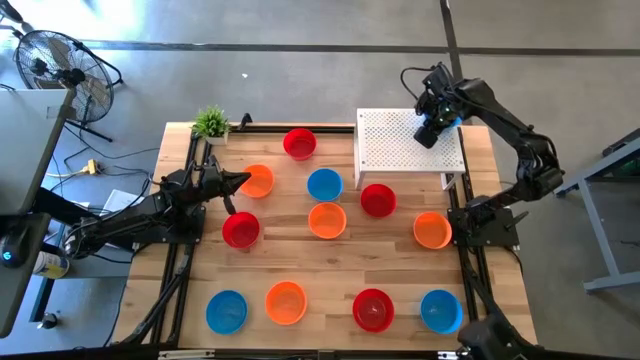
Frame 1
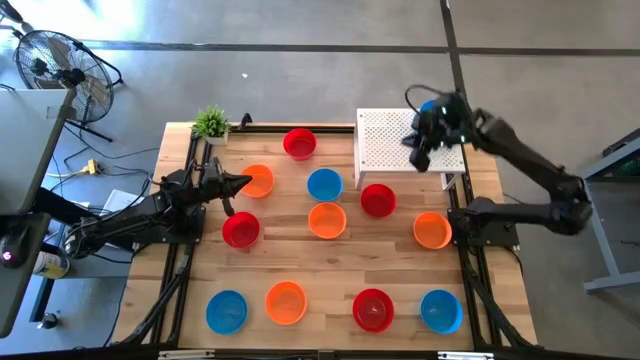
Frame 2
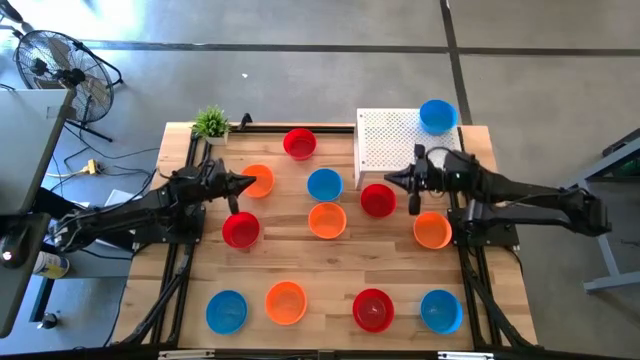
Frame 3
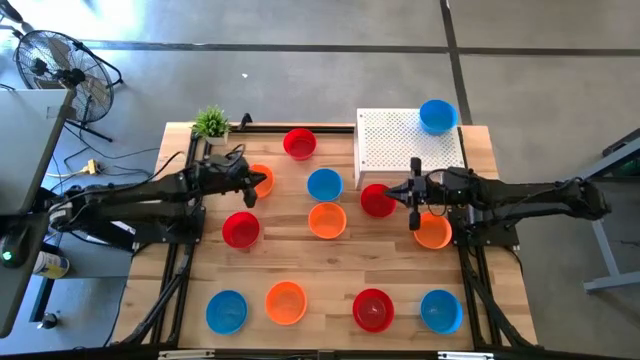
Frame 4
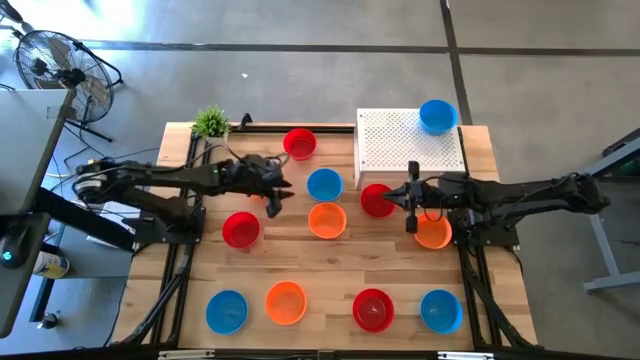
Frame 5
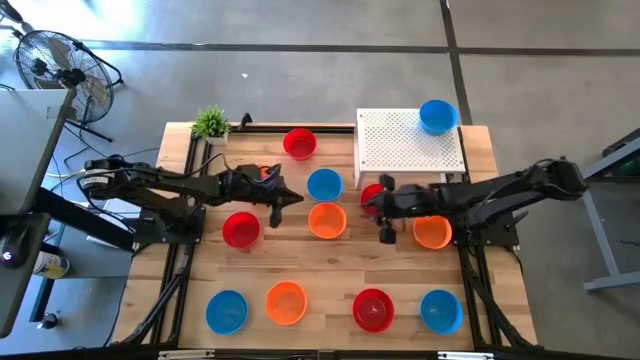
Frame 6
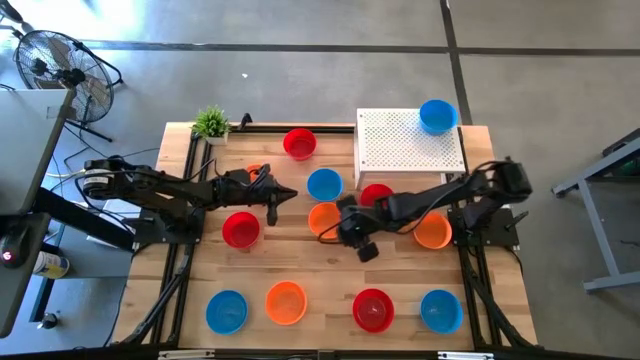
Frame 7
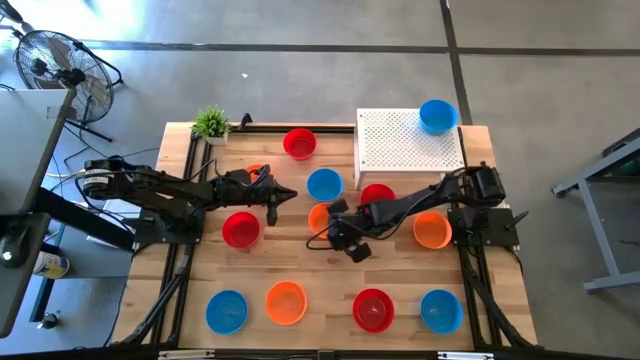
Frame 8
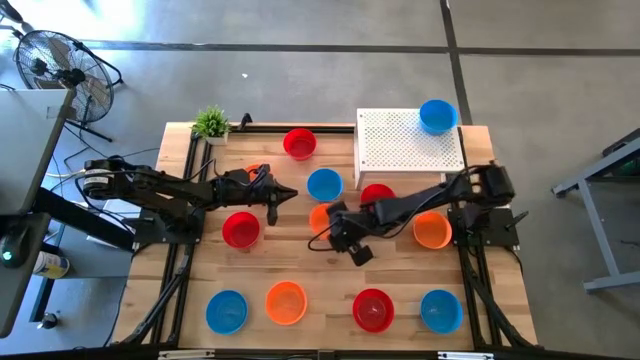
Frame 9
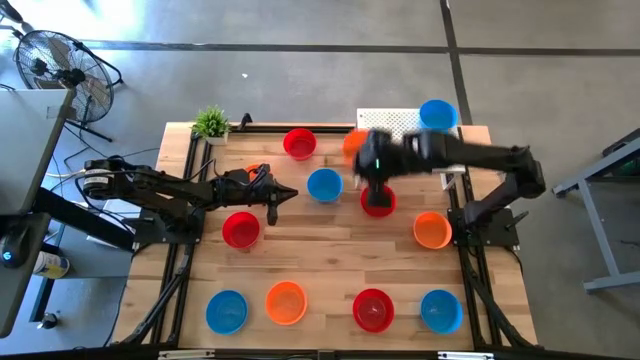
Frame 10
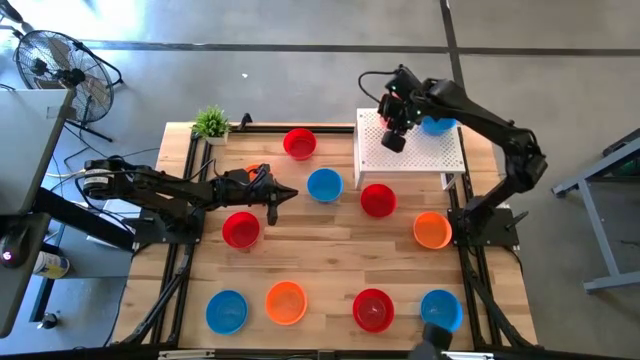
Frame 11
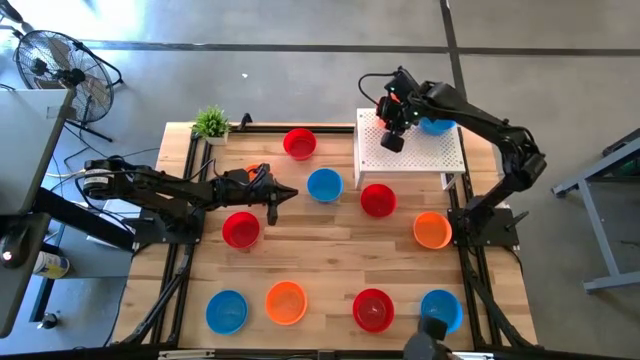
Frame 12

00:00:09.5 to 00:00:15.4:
Task: Pick & Place Mini bowls
Put the orange bowl on the shelf

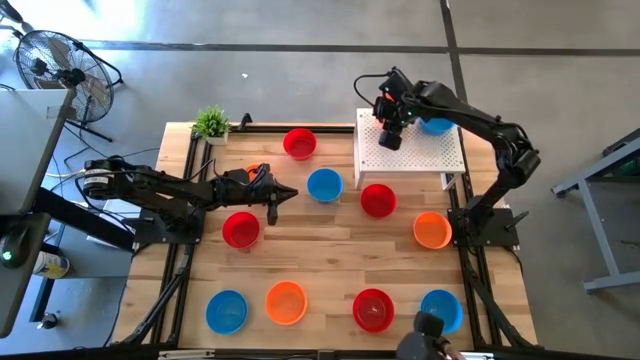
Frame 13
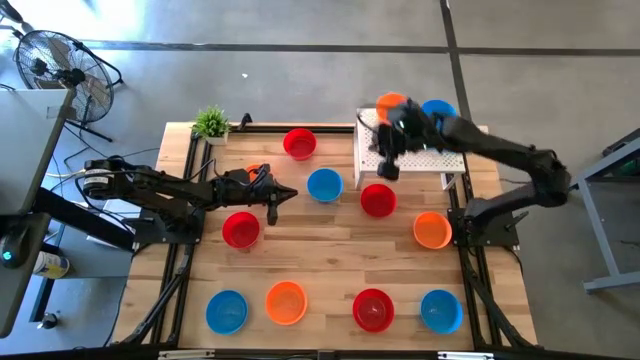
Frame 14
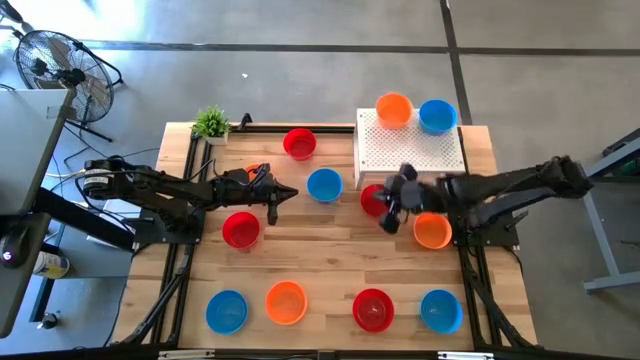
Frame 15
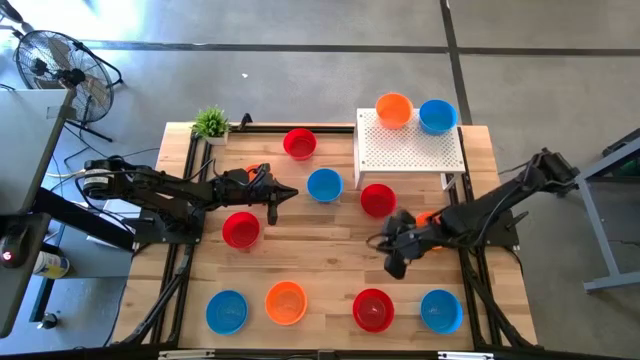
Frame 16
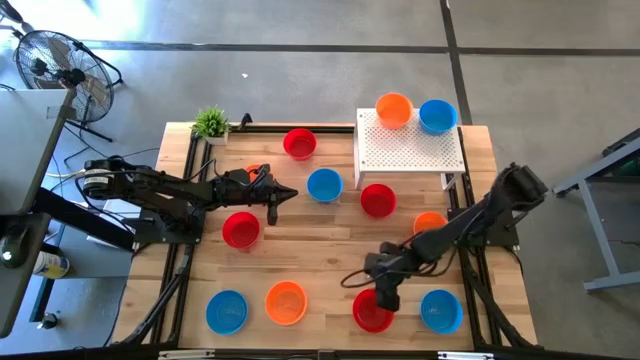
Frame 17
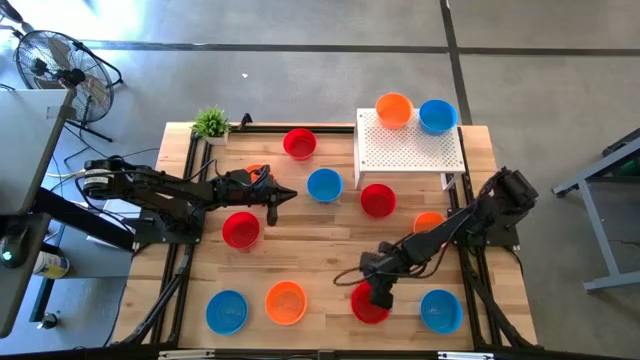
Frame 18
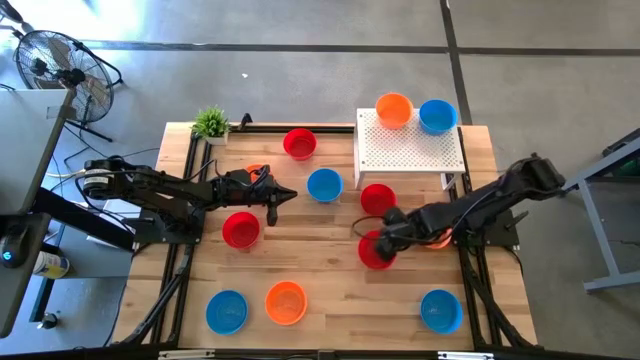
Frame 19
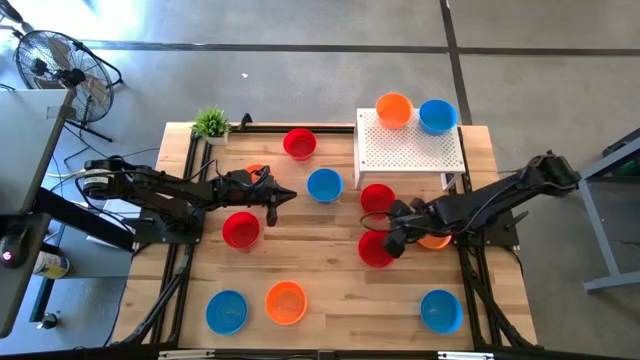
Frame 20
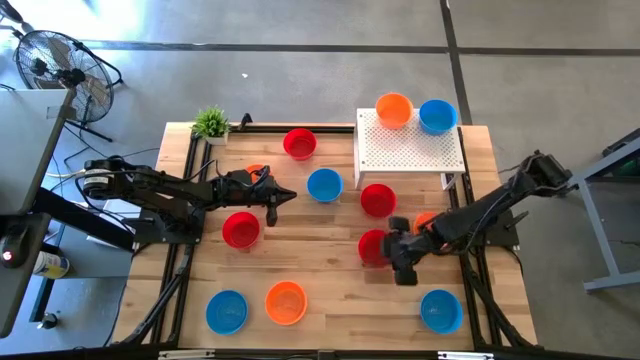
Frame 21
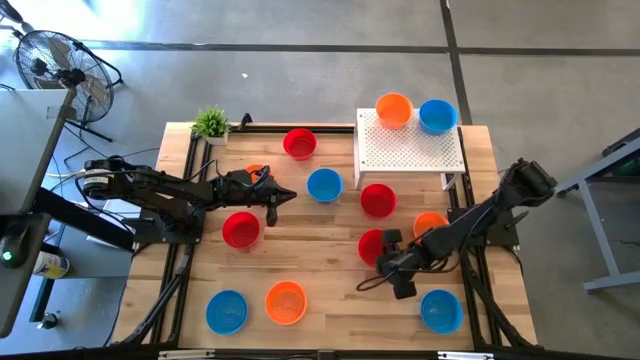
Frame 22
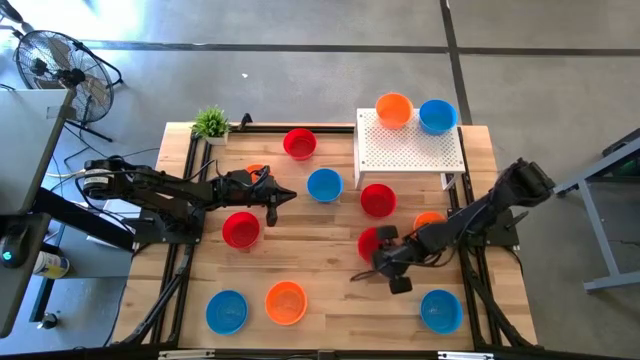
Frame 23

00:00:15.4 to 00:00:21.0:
Put the red bowl on the shelf

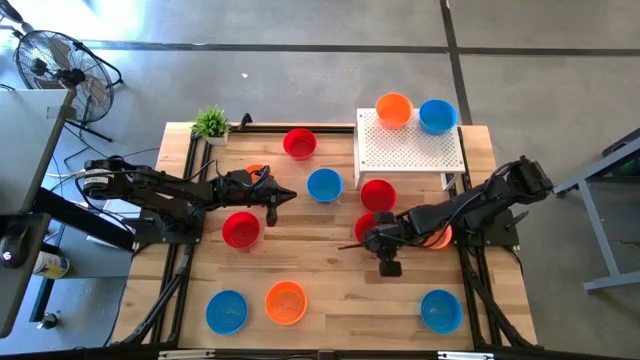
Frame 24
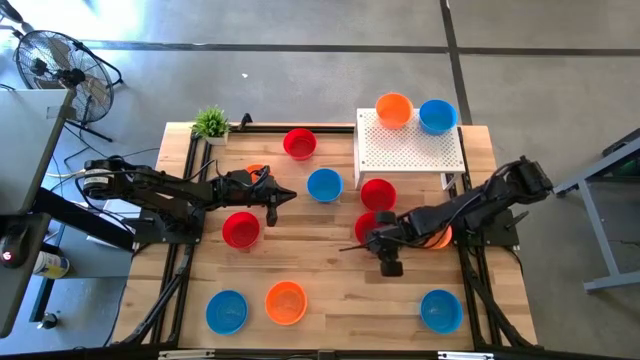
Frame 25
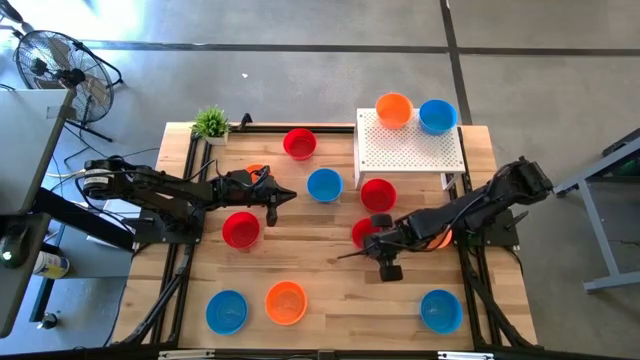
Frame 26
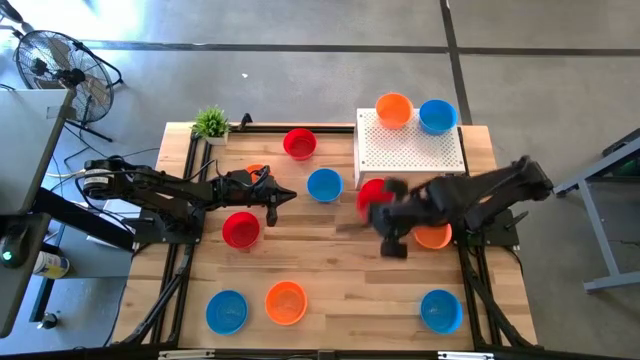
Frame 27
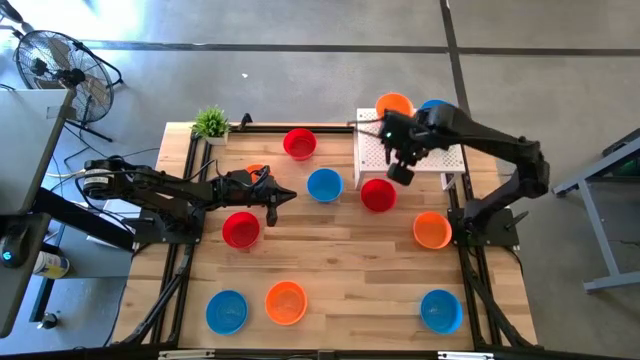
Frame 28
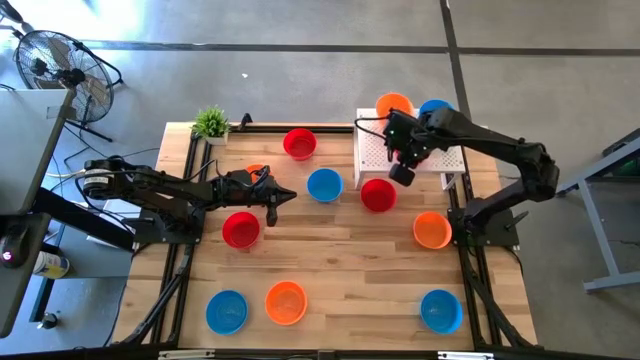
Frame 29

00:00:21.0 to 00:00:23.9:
Put the red bowl on the shelf

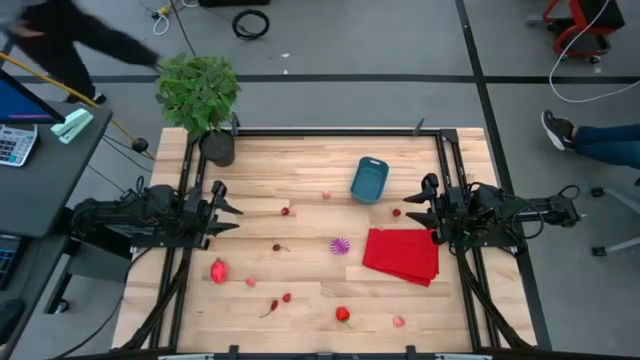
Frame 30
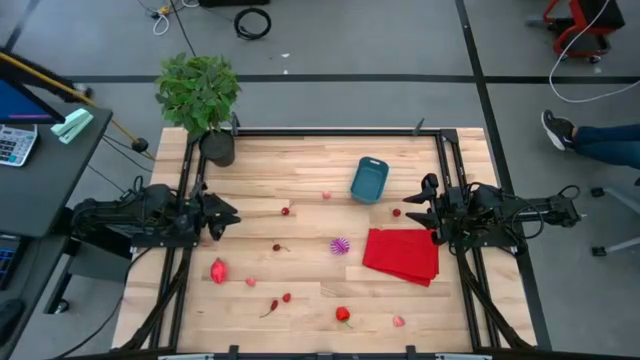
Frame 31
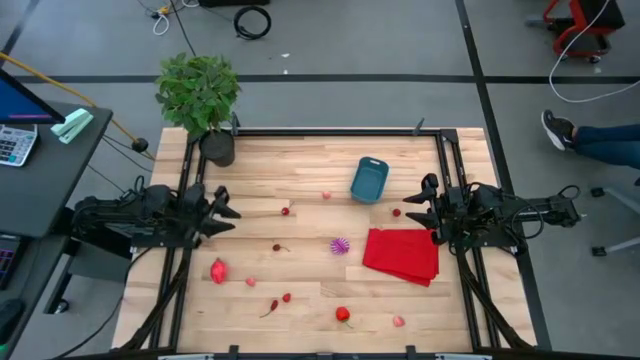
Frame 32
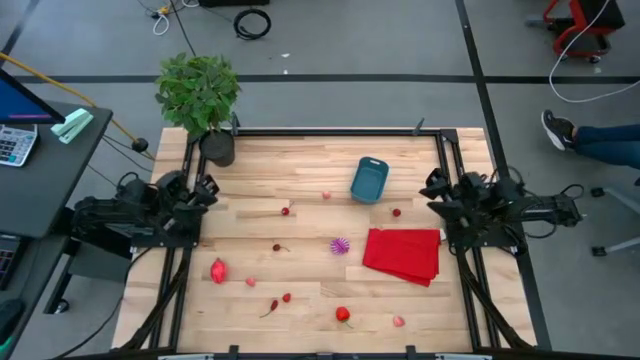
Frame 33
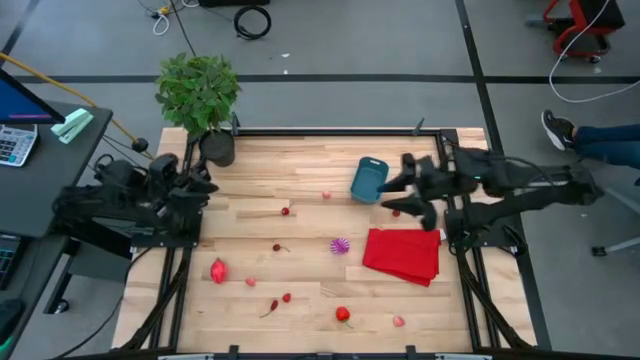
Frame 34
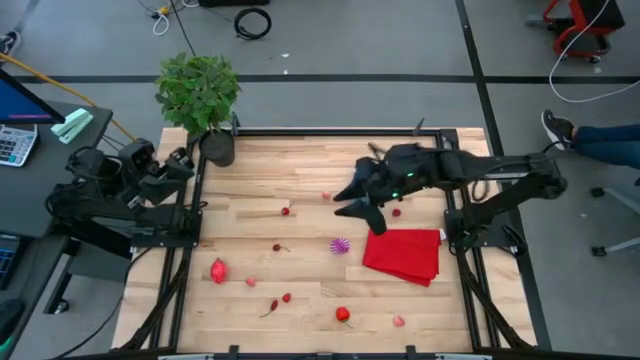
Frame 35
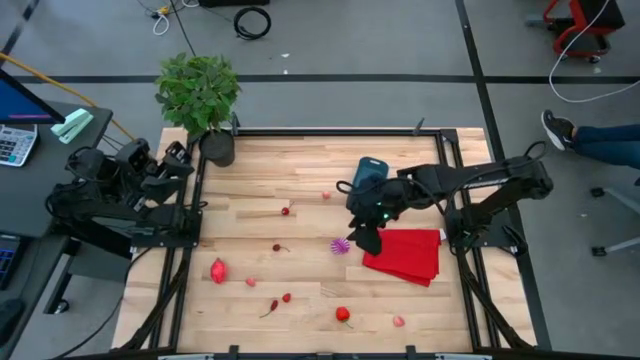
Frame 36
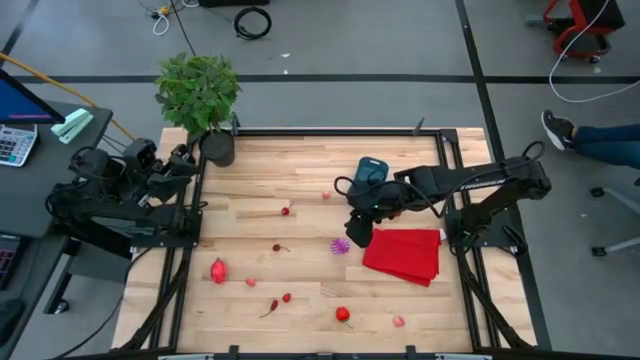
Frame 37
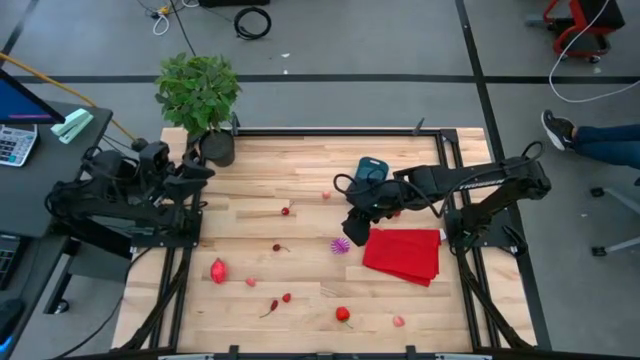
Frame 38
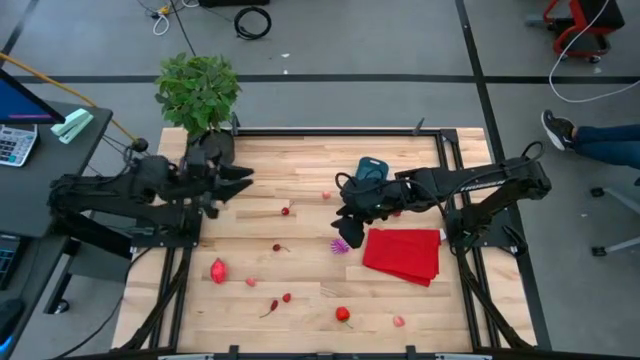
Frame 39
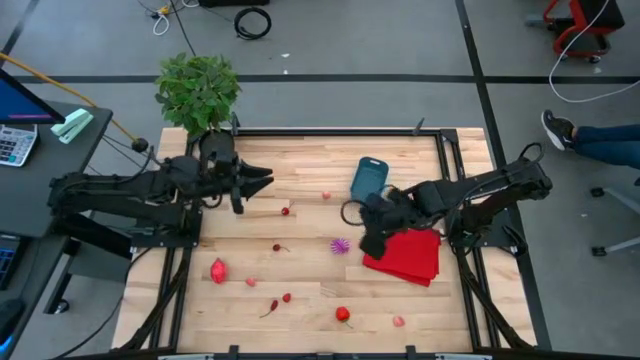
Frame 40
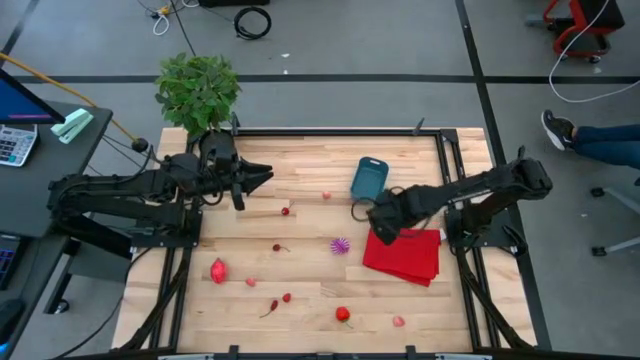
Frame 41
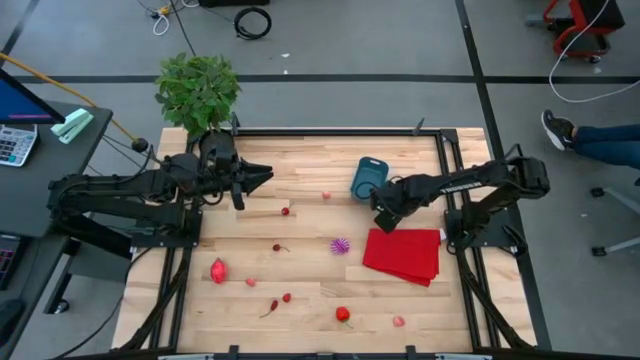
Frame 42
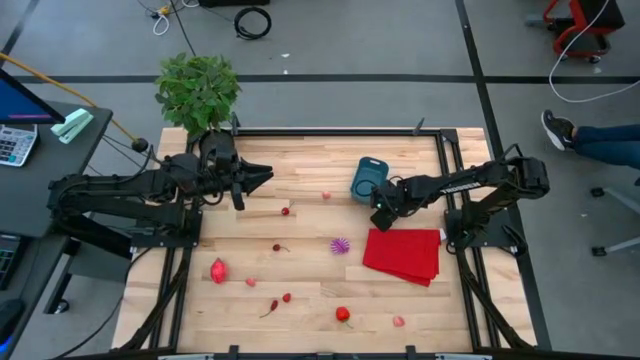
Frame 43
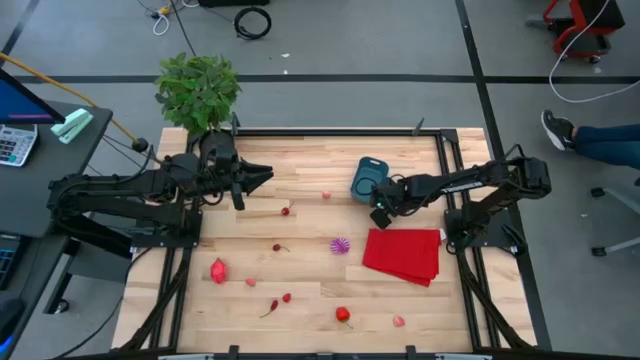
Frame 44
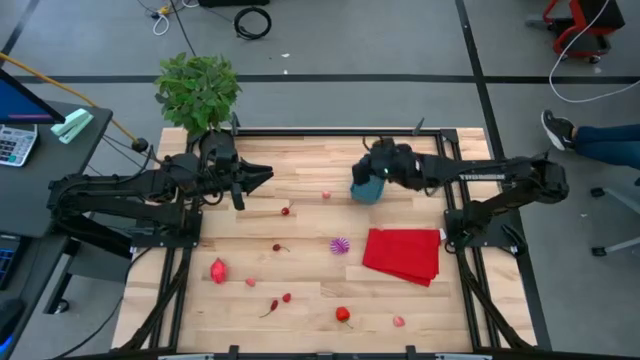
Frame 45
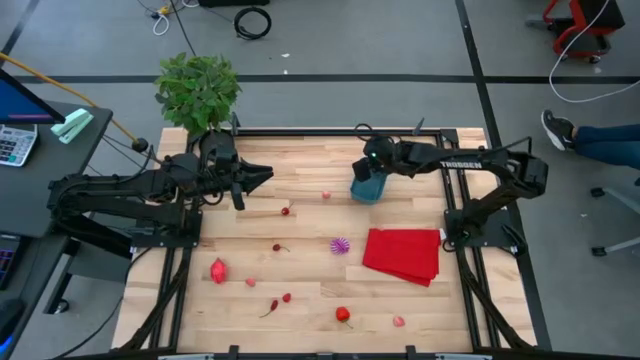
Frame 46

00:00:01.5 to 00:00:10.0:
Task: Pick and placing Produce into tupperware
Put the berry into the bin
